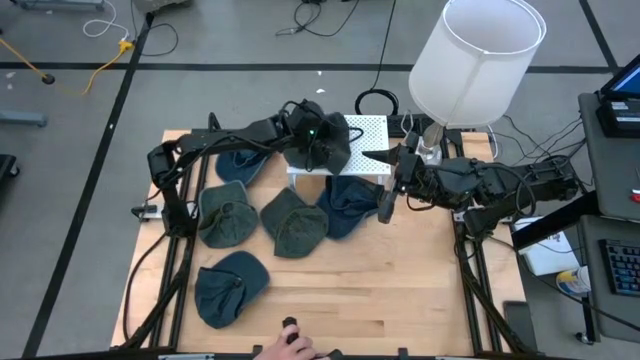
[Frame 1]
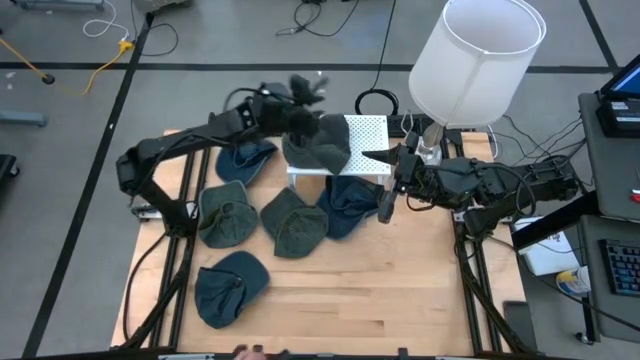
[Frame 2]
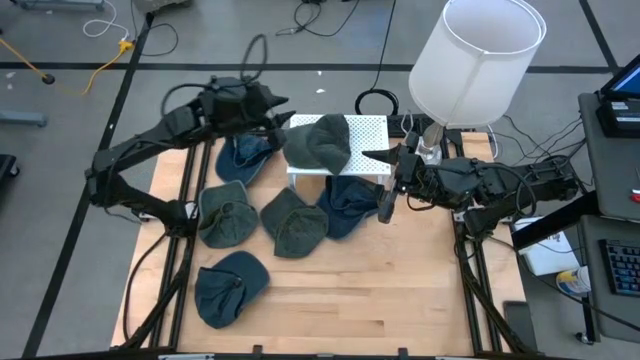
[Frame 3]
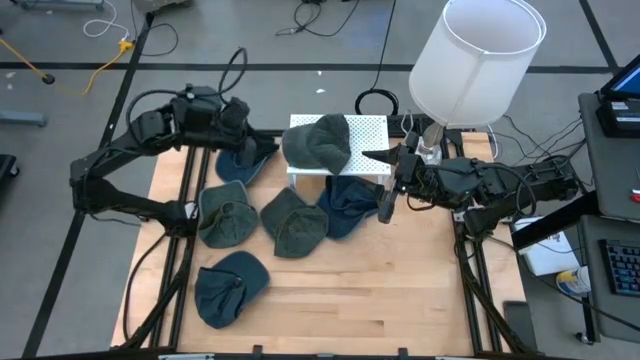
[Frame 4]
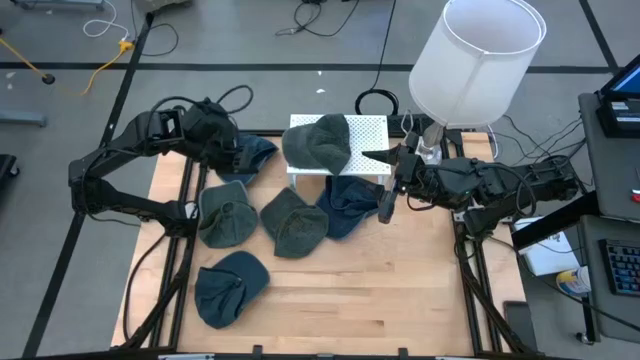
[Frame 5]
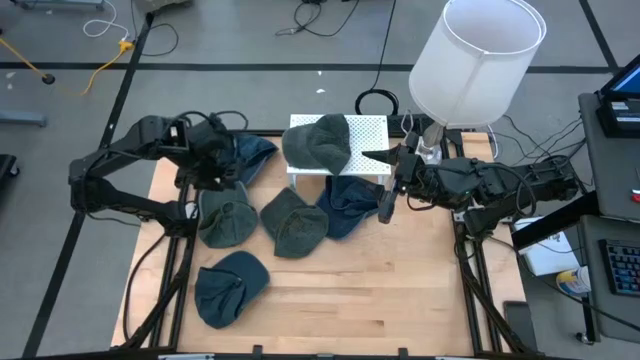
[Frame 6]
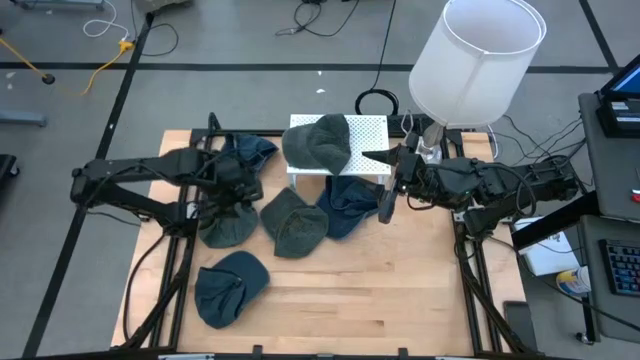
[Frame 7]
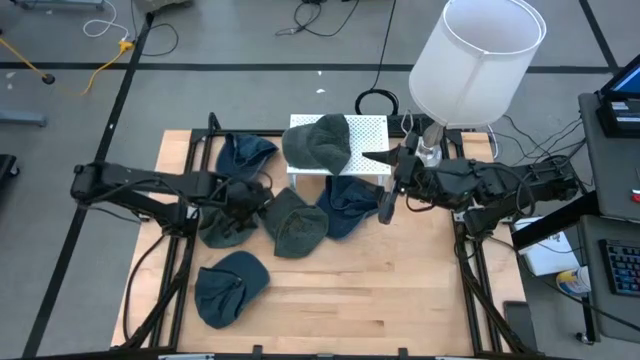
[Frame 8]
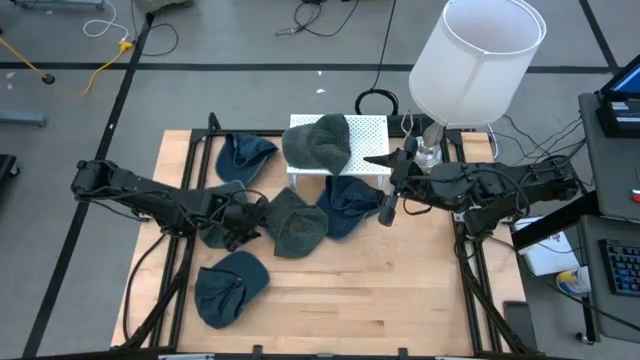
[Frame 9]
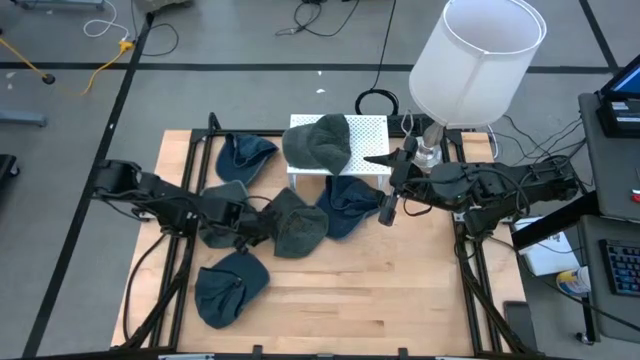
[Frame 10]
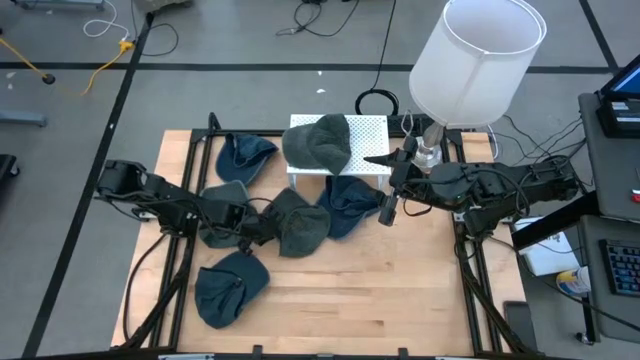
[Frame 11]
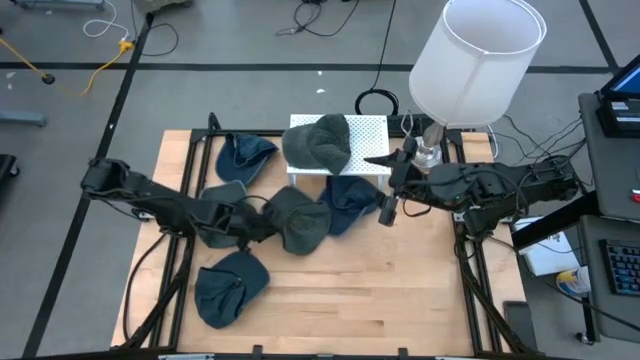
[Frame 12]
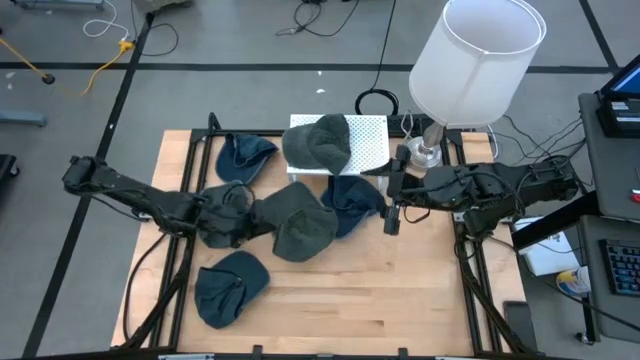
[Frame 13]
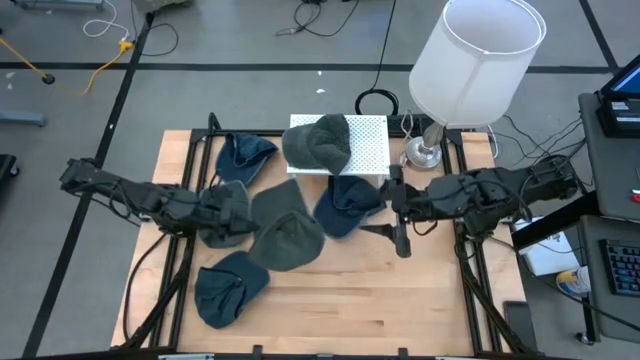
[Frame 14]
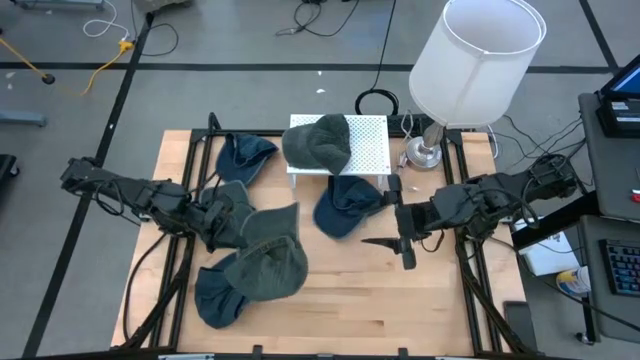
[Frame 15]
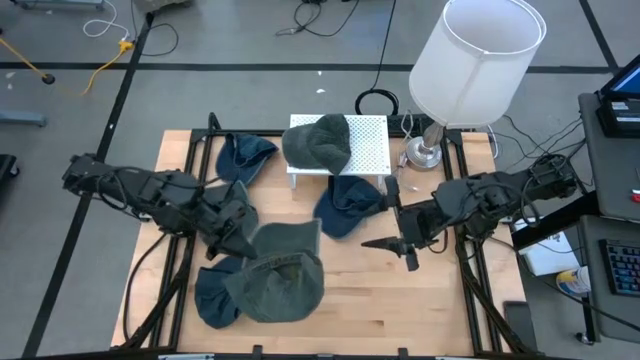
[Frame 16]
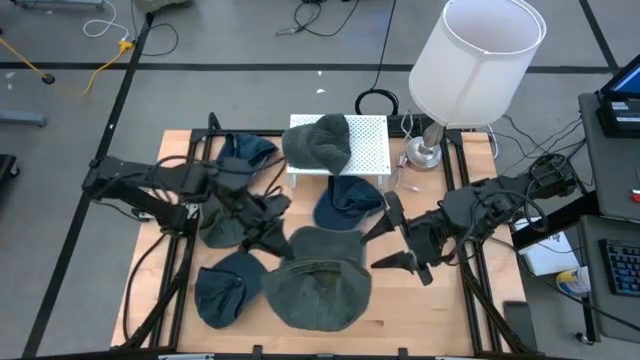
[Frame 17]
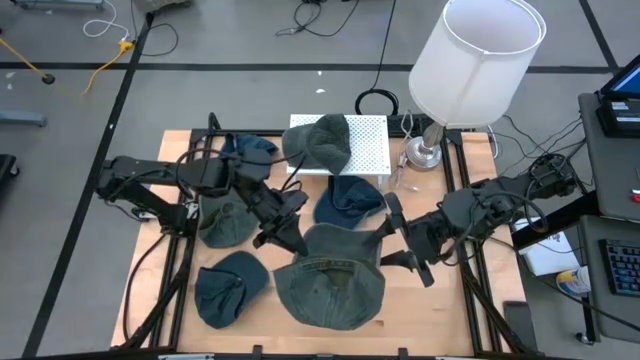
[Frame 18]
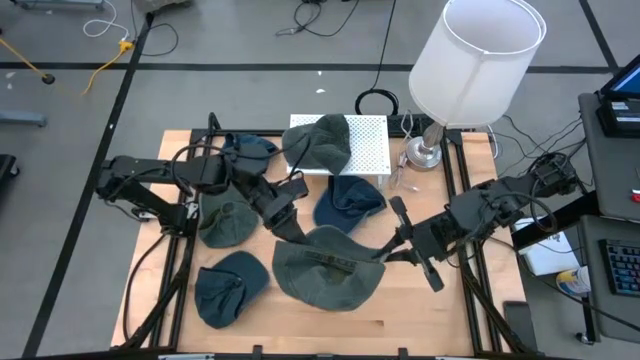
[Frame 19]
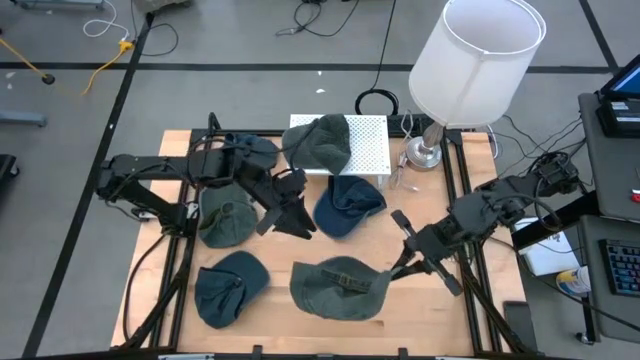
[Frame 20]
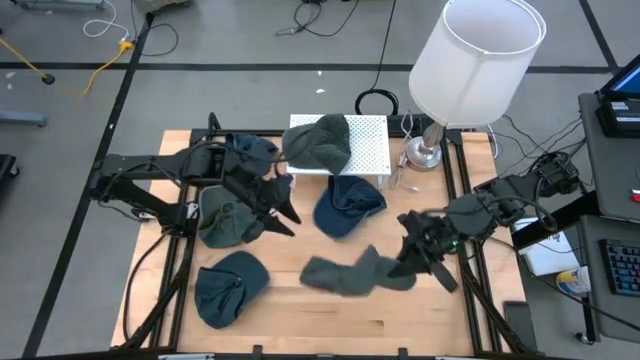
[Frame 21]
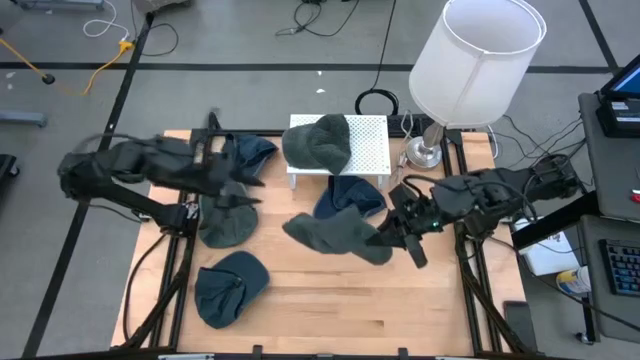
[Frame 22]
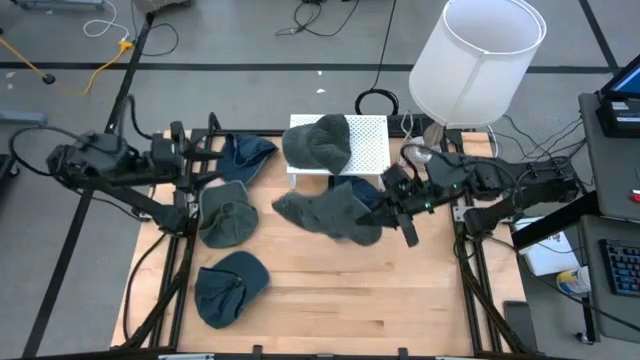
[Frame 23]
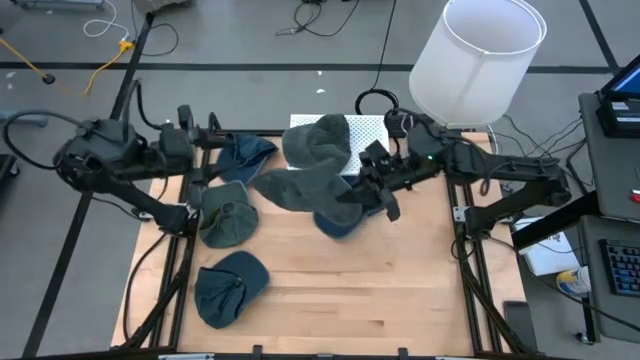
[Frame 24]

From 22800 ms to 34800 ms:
Task: Pick & Place hat
Stack the right gray cap on top of the gray cap on the shelf

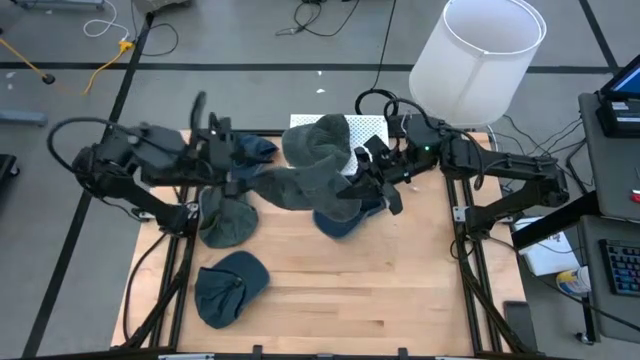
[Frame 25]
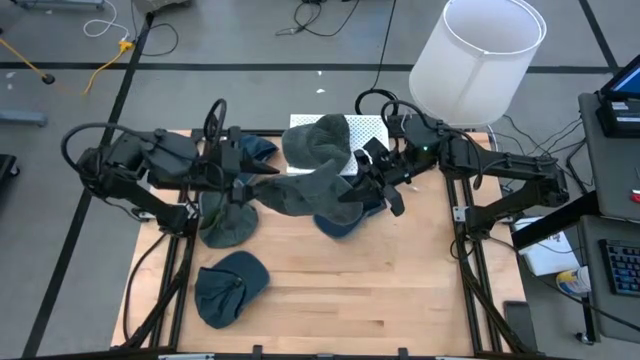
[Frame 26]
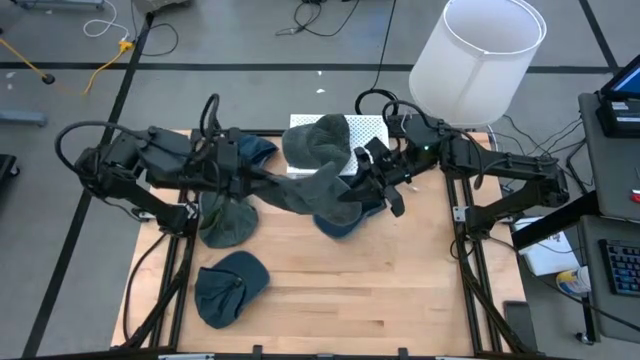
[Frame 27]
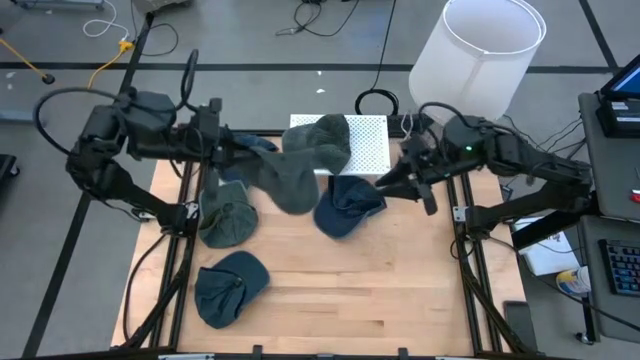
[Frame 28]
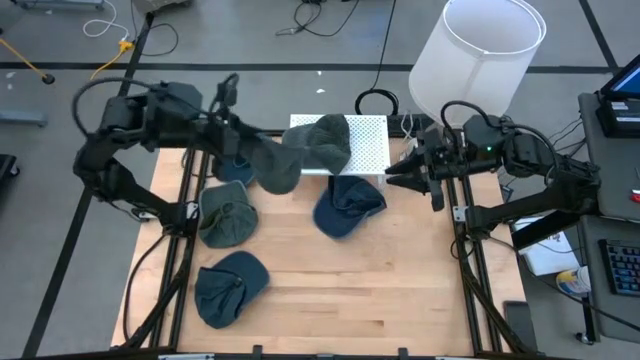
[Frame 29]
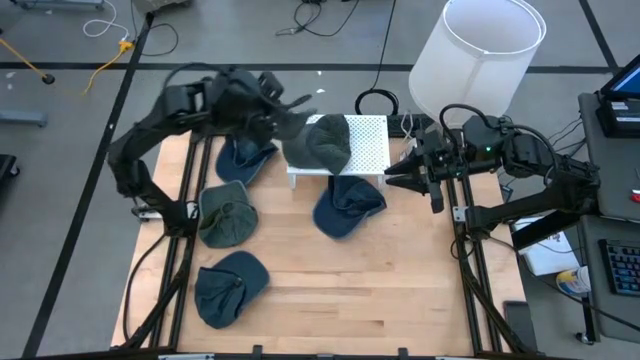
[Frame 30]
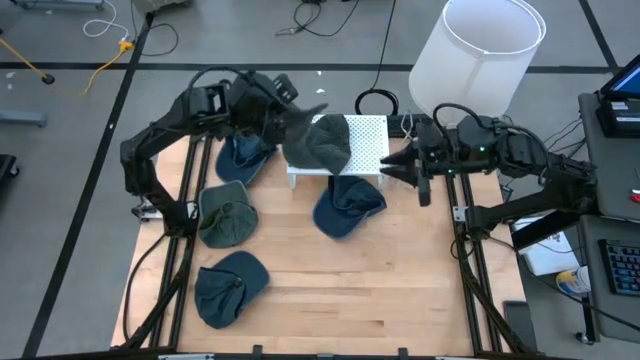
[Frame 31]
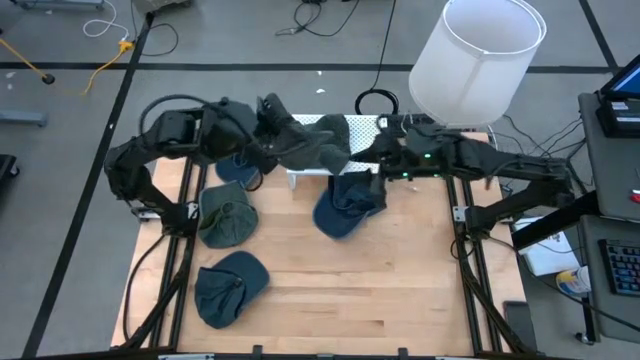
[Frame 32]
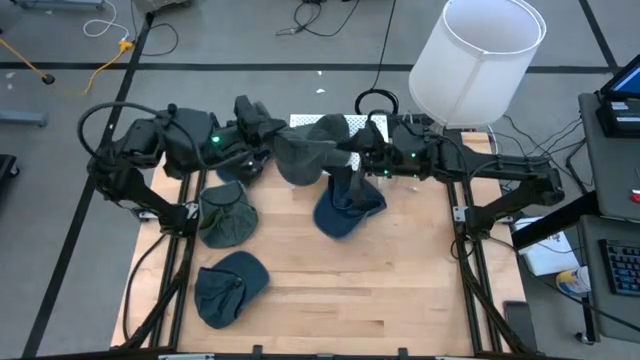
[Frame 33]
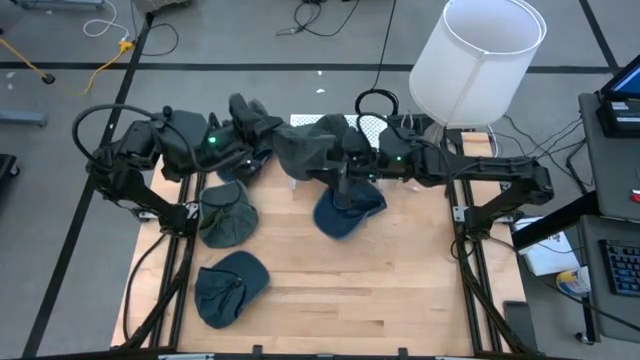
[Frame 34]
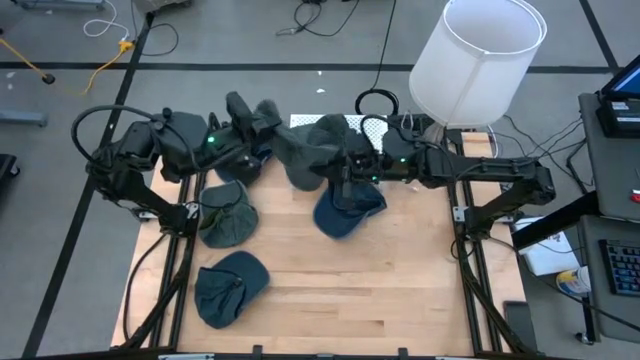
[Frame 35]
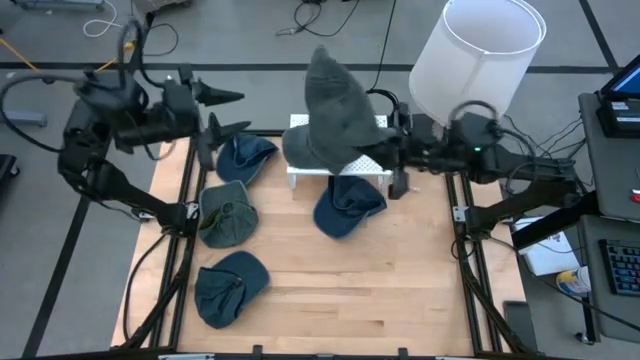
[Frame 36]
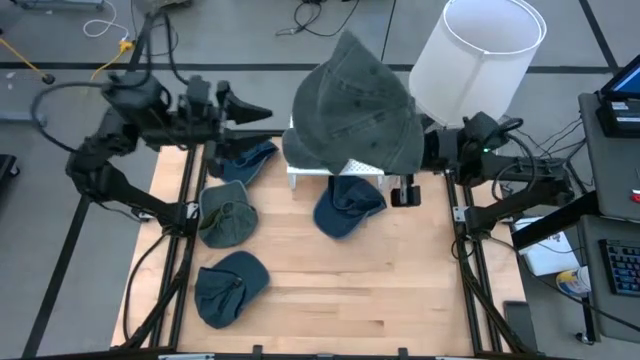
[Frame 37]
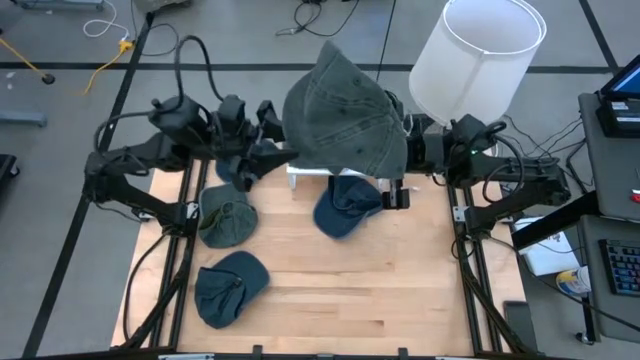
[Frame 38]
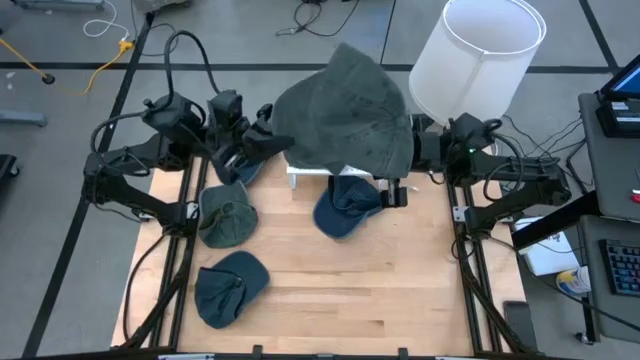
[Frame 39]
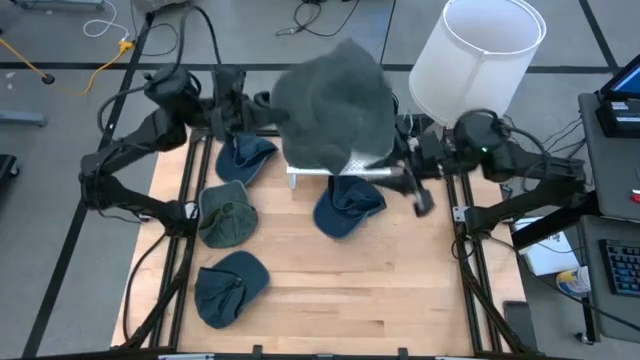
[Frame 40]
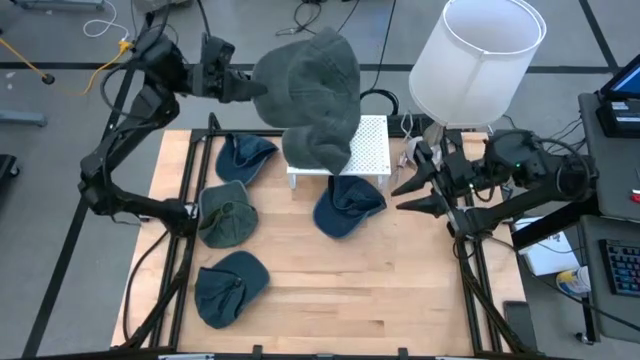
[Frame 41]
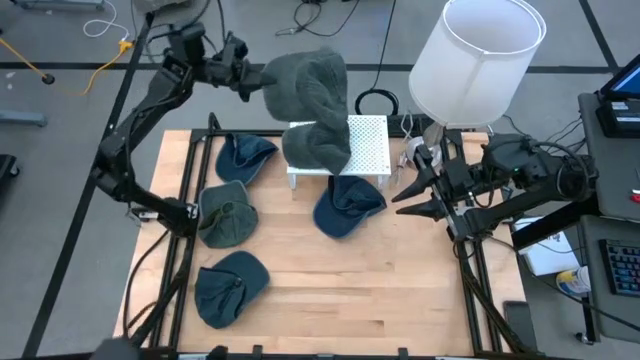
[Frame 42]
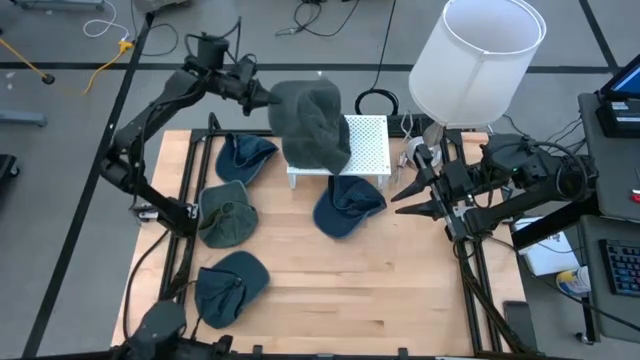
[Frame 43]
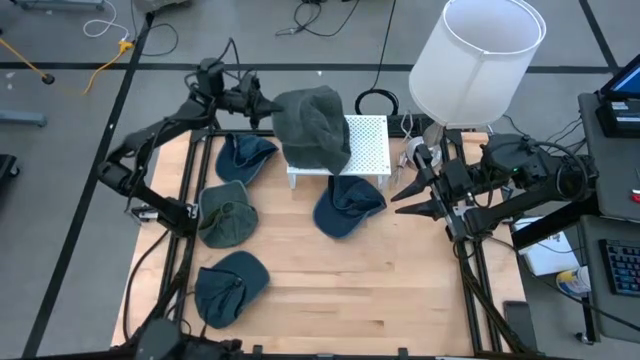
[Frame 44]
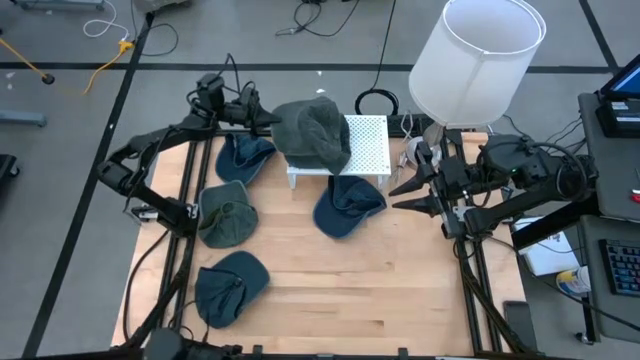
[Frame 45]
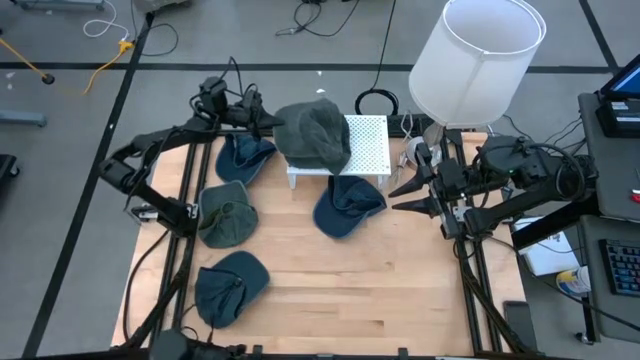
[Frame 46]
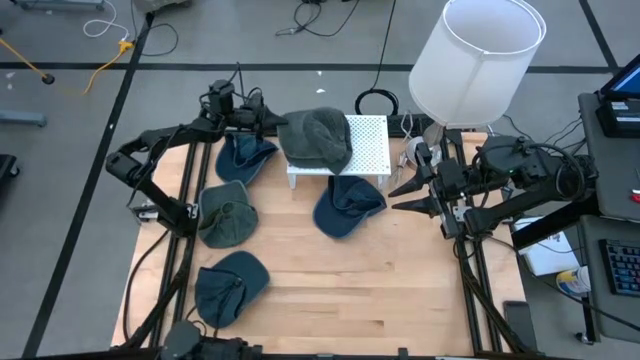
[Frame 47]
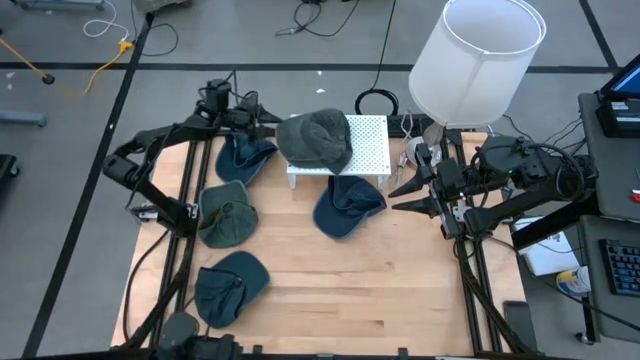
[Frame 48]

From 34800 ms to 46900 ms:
Stack the right gray cap on top of the gray cap on the shelf
